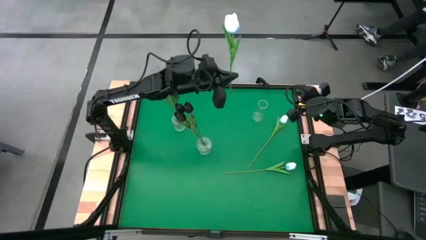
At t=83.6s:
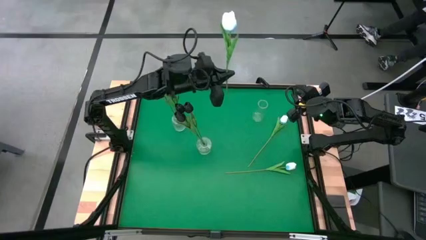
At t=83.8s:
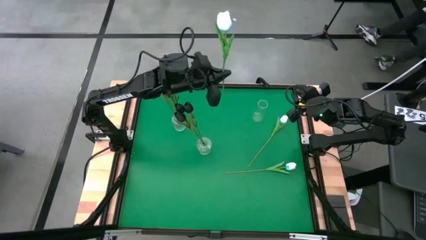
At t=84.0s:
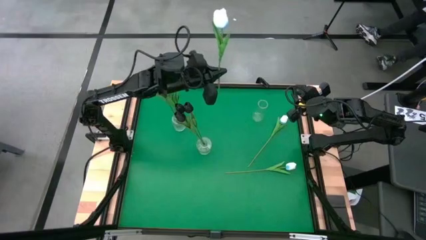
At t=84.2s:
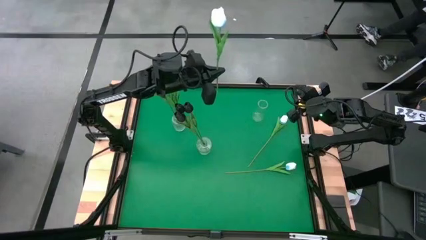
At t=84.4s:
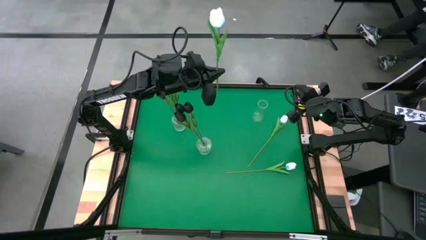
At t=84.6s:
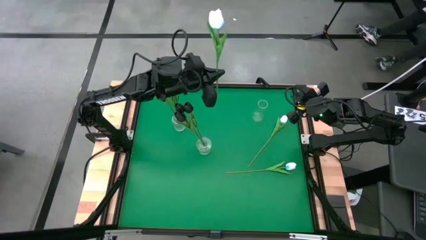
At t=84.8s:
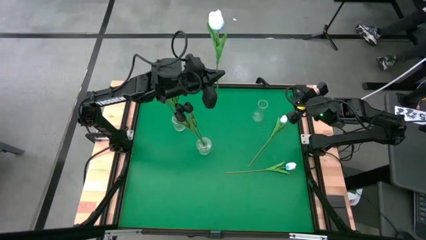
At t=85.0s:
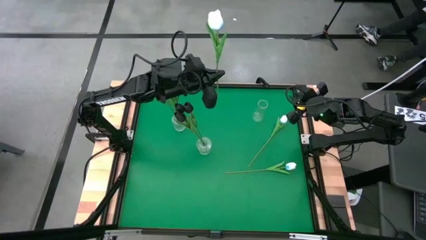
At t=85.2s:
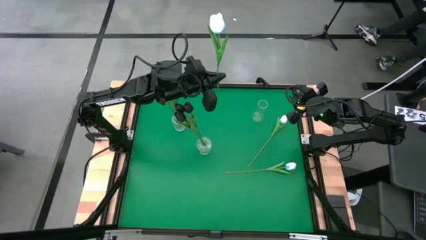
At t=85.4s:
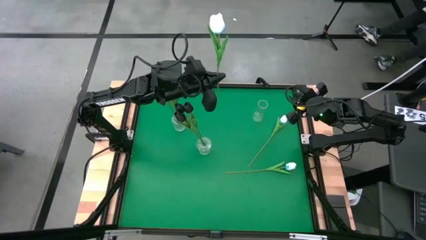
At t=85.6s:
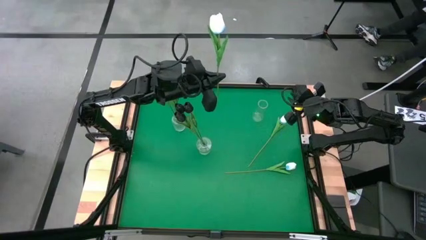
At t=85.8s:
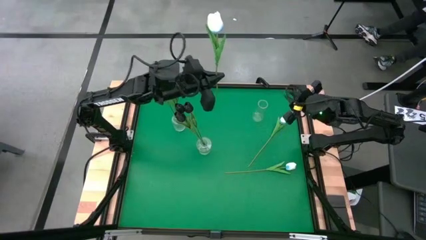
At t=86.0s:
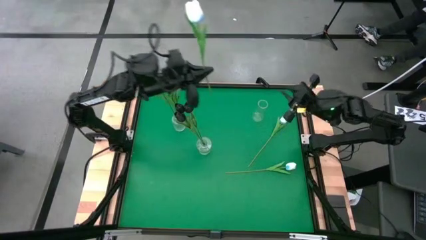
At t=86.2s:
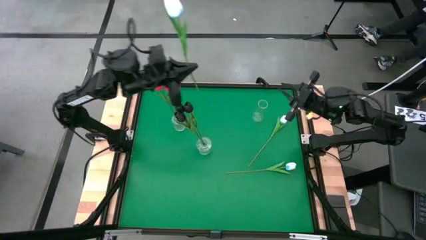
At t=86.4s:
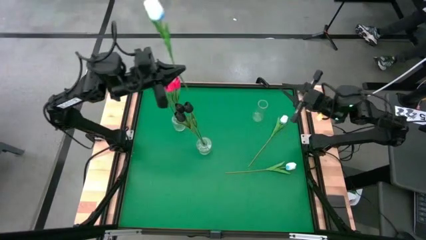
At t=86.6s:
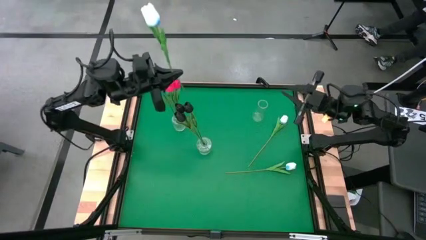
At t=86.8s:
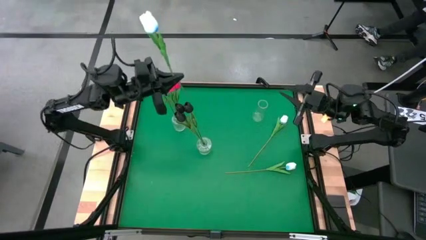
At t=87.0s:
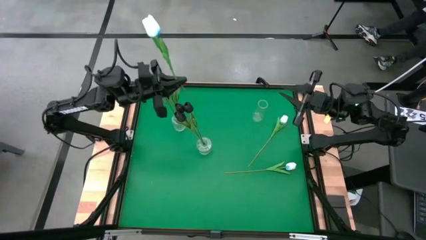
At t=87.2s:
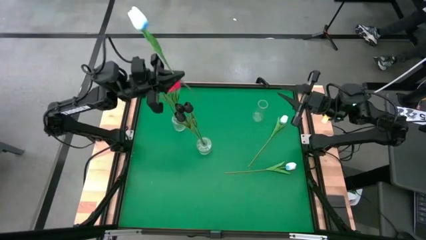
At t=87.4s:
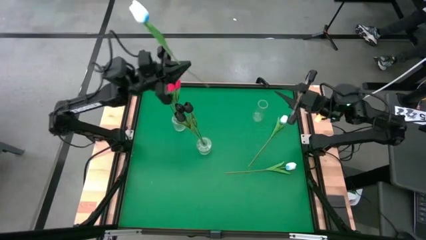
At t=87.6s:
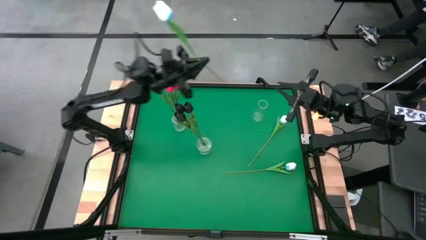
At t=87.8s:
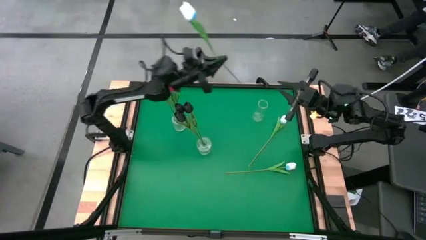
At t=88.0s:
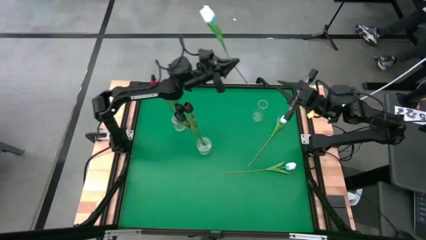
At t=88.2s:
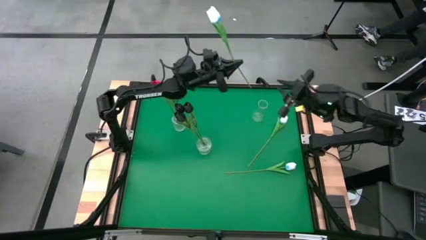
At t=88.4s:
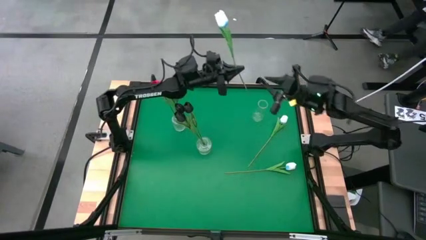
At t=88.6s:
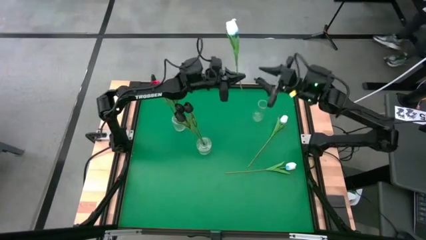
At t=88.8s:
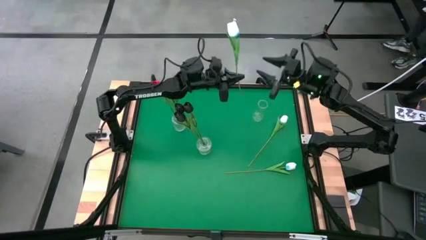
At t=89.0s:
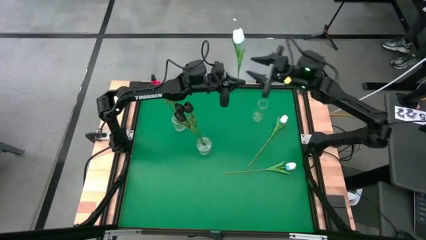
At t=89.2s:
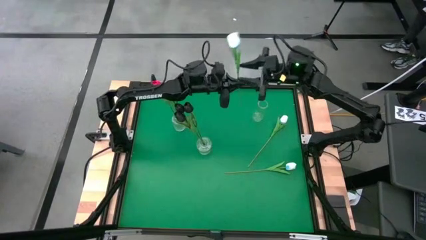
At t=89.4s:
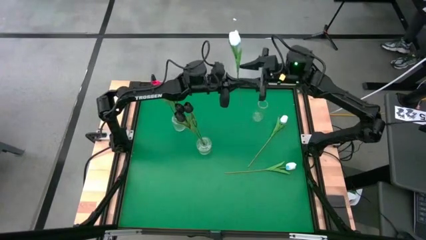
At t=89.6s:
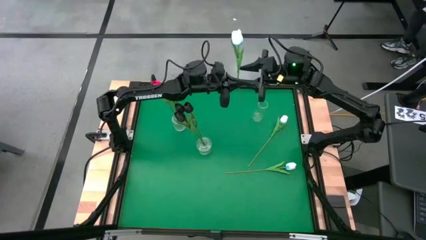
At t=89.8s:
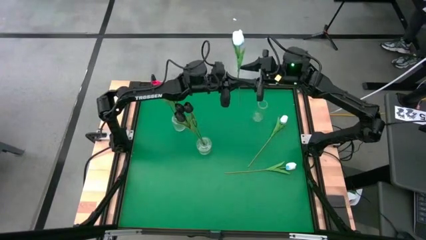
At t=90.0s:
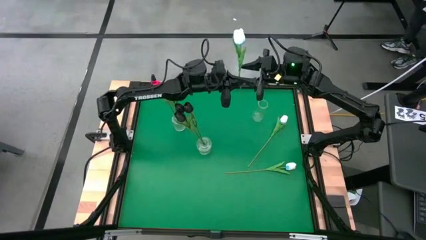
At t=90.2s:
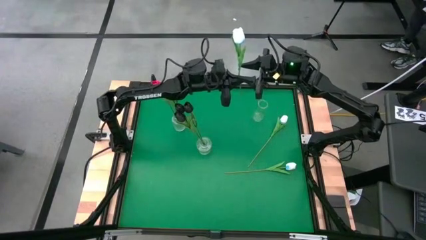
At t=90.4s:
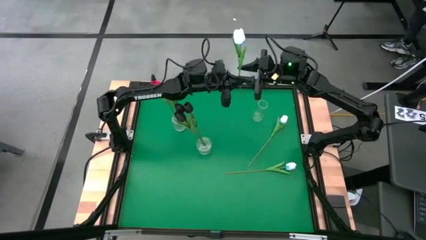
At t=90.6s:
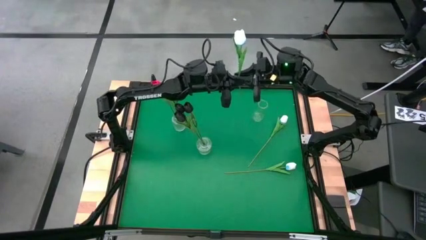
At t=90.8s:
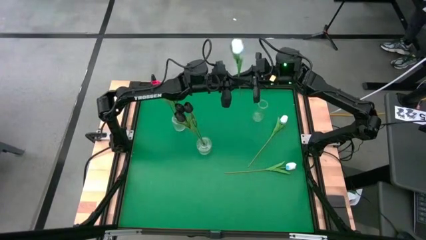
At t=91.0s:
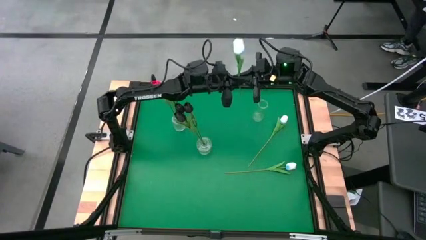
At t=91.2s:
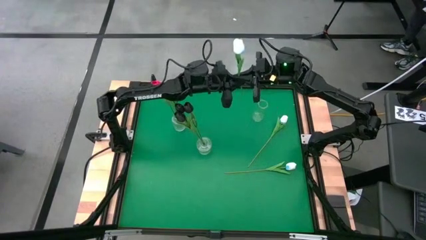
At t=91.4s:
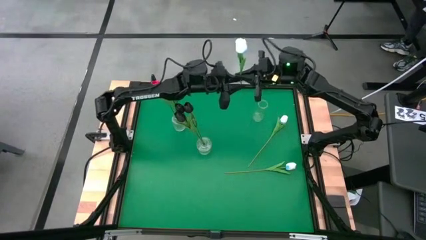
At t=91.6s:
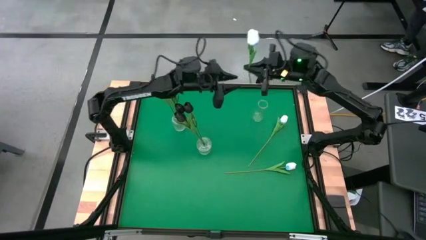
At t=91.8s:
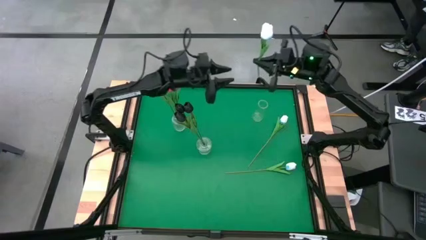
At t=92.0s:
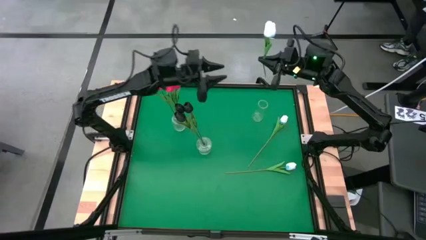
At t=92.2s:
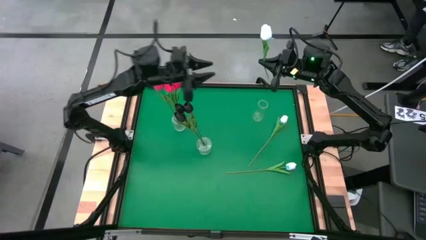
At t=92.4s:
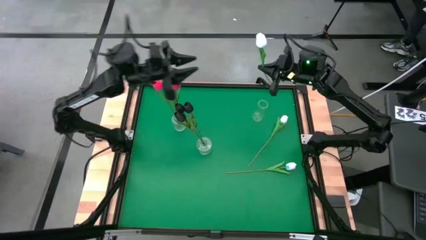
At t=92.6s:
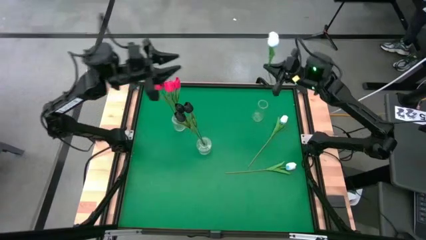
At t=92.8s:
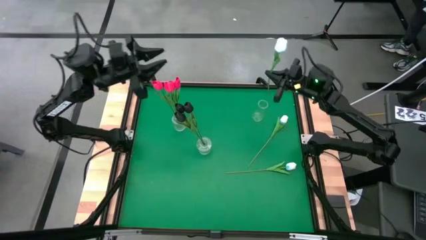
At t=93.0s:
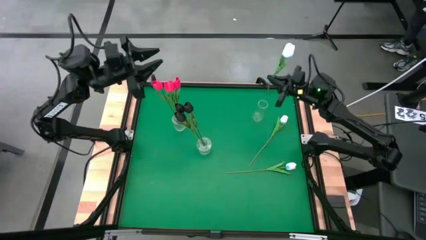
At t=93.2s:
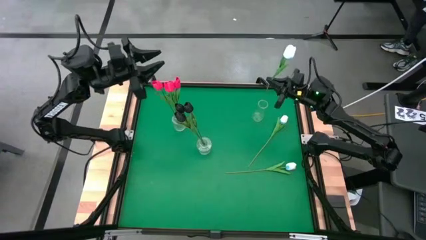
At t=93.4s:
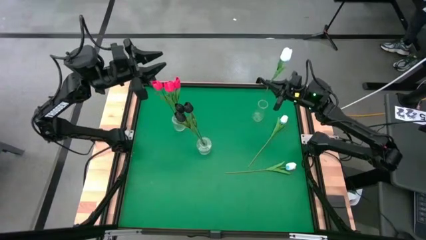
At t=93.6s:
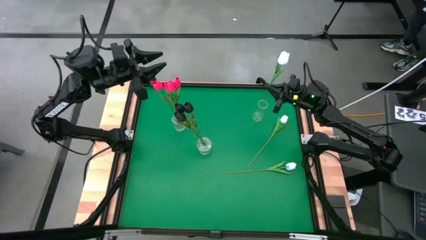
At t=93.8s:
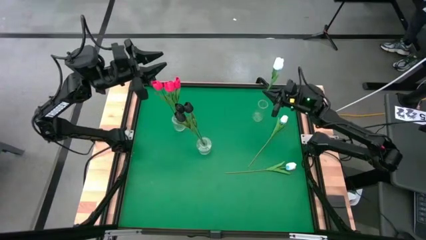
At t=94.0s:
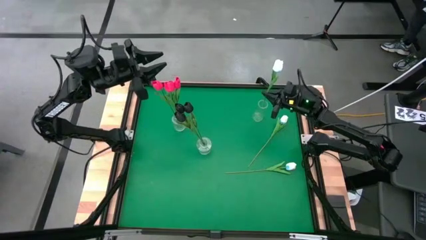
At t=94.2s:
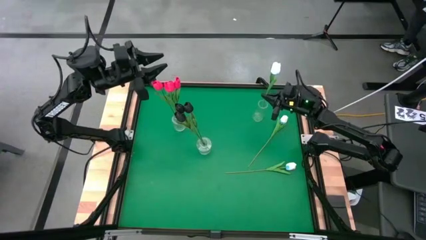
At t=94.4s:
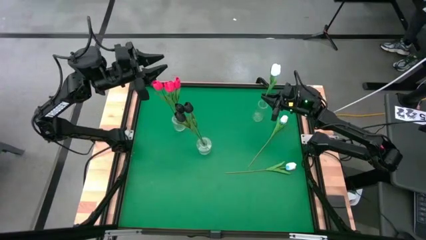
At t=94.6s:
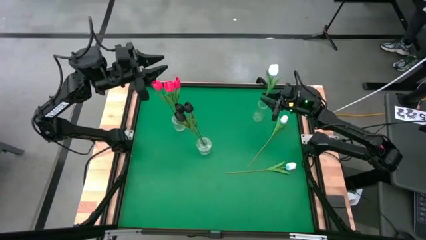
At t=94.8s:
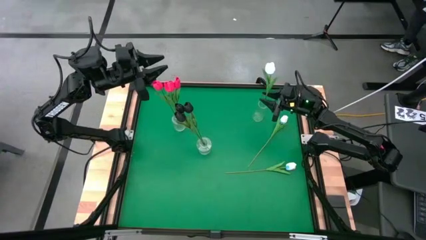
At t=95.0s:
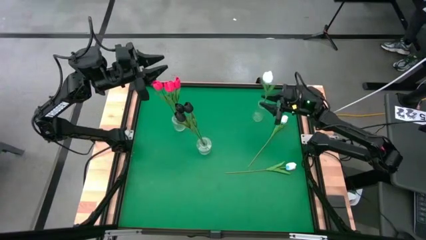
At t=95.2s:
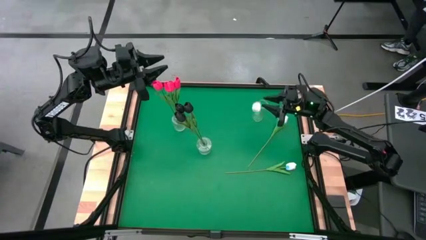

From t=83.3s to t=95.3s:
Task: Sort flowers into vase by color
Put the top white tulip into the top right transparent vase

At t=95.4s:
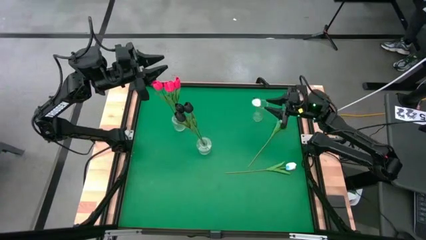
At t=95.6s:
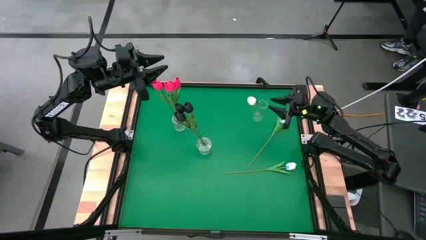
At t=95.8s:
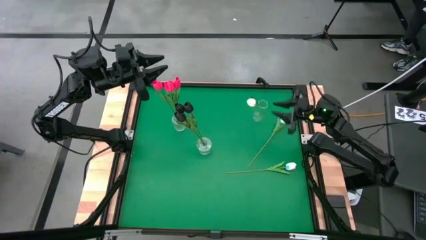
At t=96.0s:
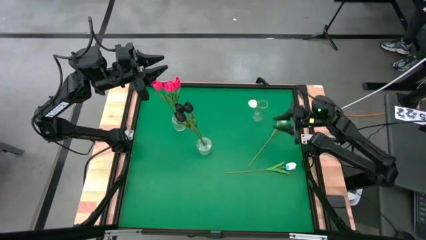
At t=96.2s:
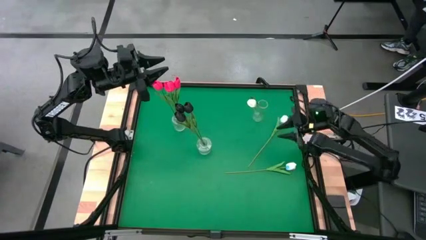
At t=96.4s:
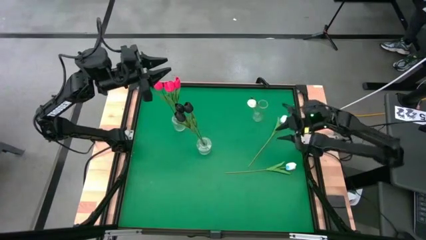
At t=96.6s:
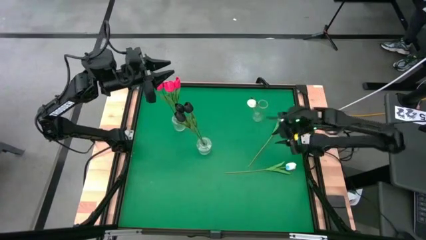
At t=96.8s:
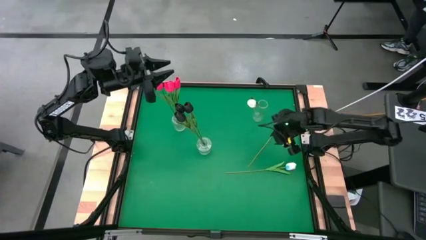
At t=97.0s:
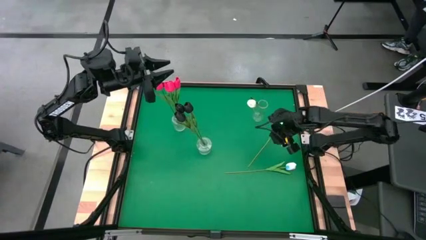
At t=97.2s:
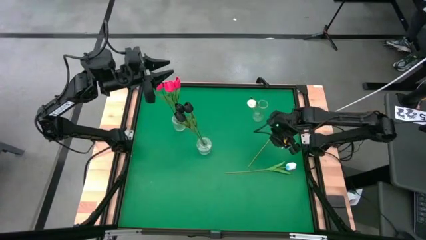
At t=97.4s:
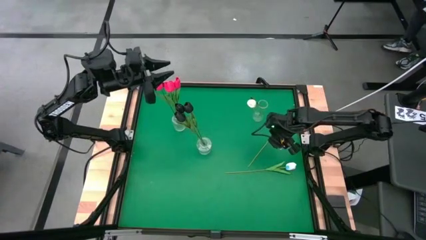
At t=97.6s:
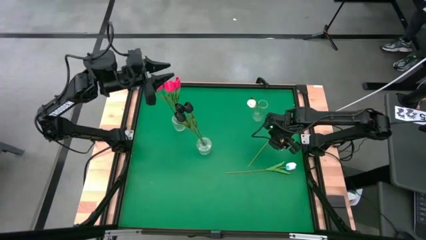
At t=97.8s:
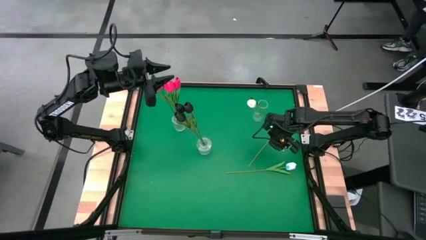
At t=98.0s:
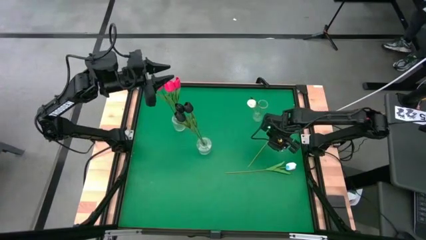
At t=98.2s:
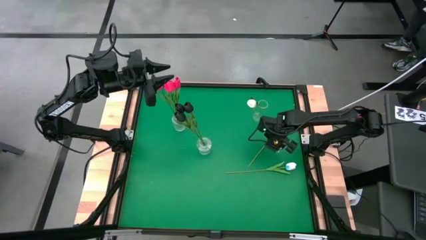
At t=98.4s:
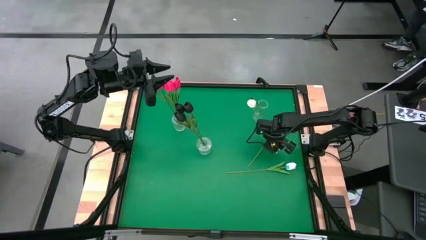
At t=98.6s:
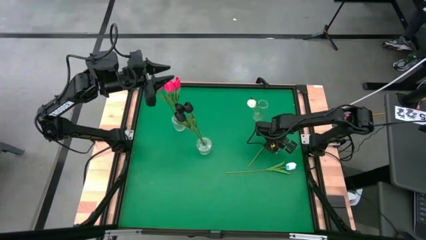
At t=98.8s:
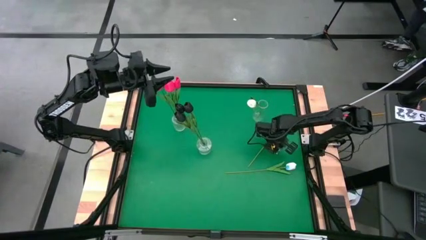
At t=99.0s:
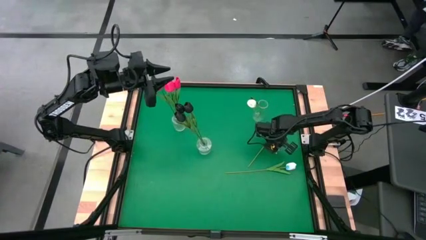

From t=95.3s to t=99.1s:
Put the top white tulip into the top right transparent vase
